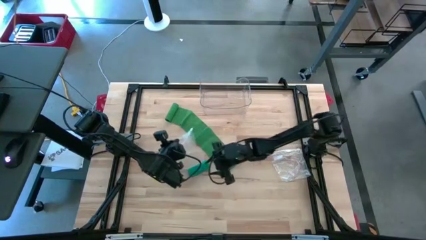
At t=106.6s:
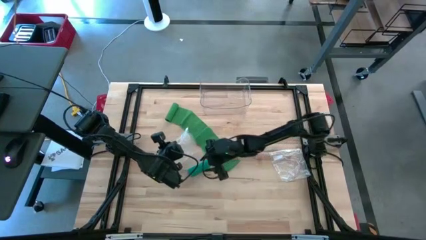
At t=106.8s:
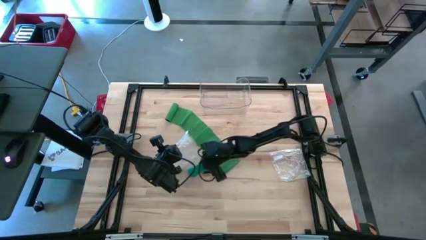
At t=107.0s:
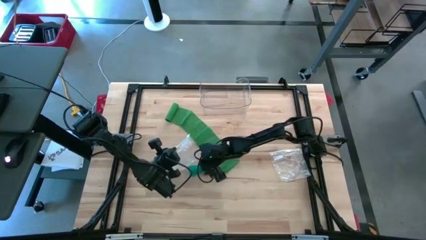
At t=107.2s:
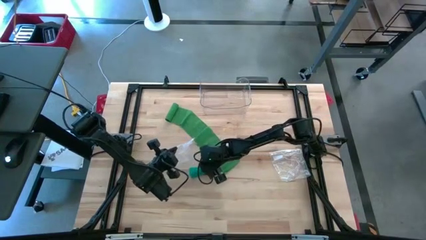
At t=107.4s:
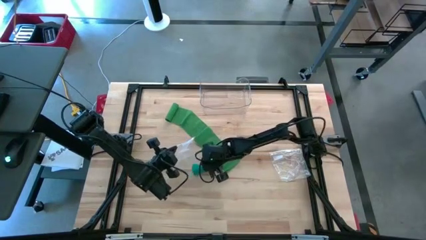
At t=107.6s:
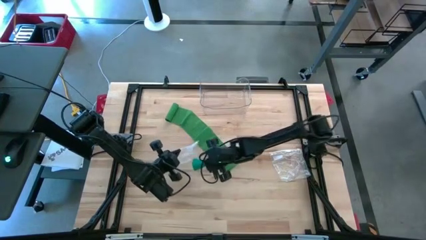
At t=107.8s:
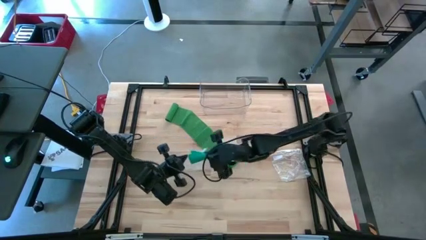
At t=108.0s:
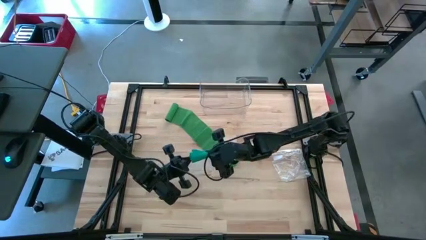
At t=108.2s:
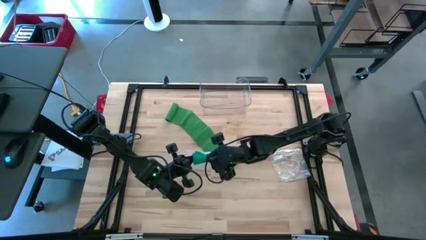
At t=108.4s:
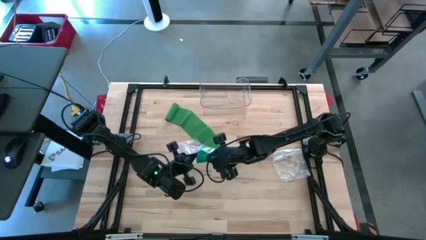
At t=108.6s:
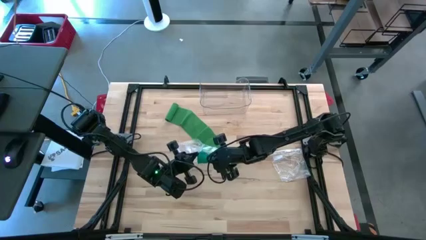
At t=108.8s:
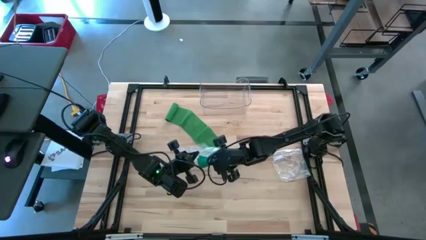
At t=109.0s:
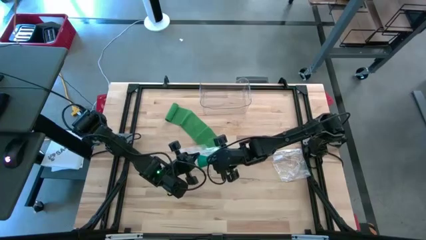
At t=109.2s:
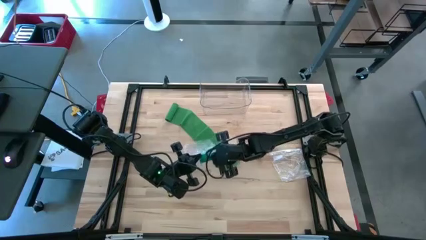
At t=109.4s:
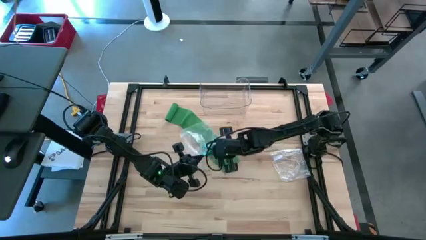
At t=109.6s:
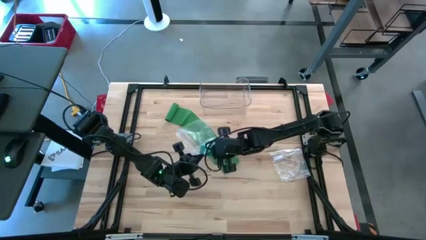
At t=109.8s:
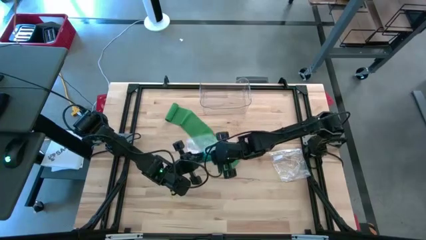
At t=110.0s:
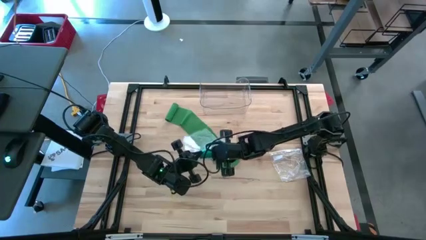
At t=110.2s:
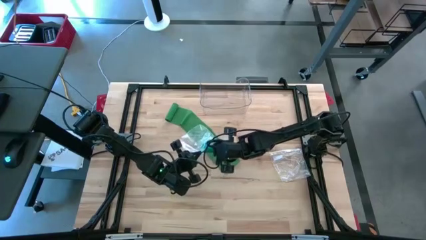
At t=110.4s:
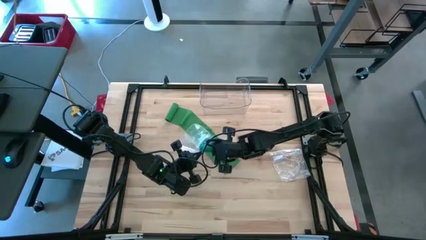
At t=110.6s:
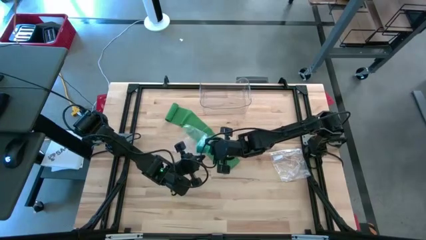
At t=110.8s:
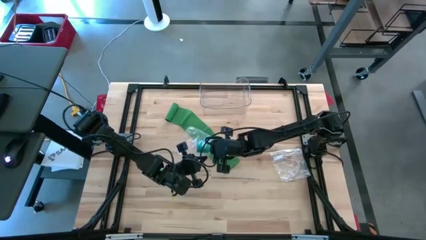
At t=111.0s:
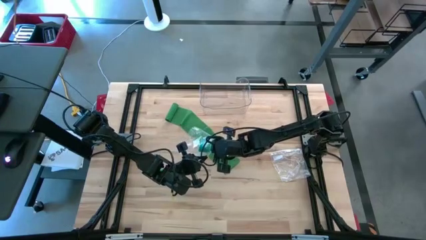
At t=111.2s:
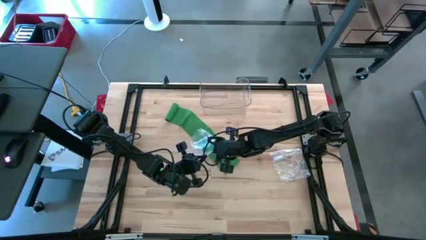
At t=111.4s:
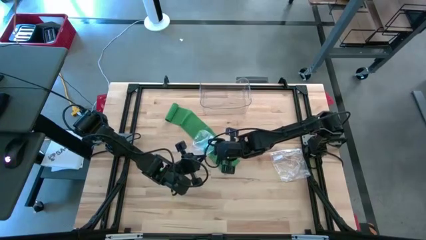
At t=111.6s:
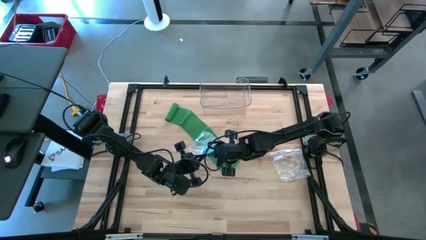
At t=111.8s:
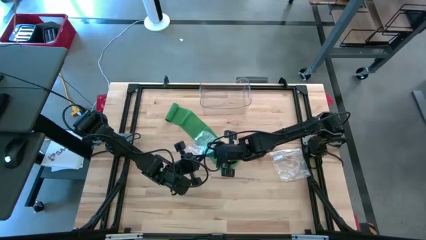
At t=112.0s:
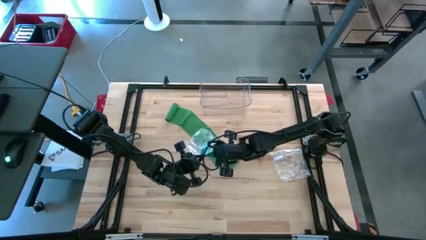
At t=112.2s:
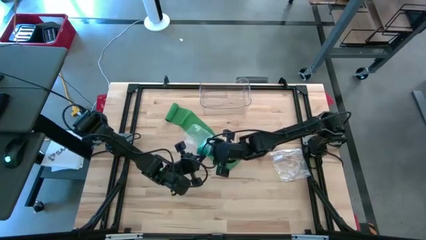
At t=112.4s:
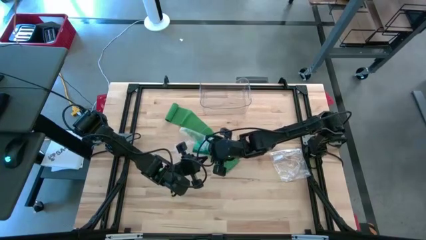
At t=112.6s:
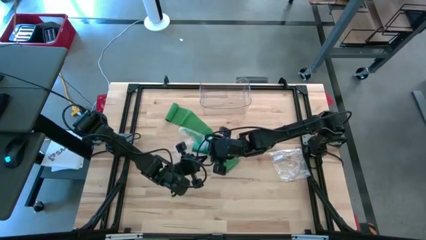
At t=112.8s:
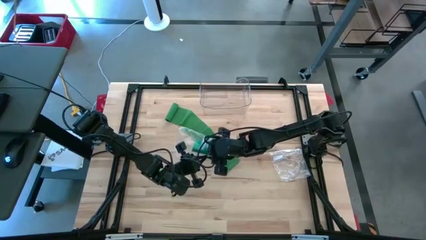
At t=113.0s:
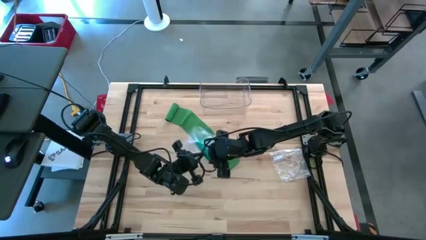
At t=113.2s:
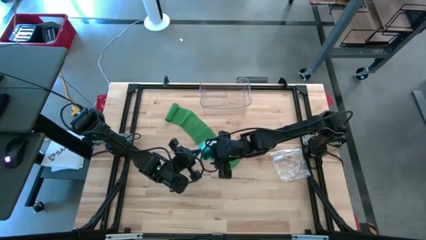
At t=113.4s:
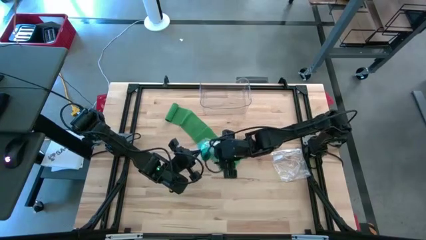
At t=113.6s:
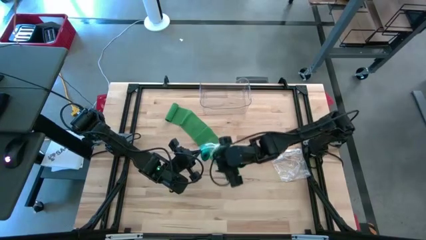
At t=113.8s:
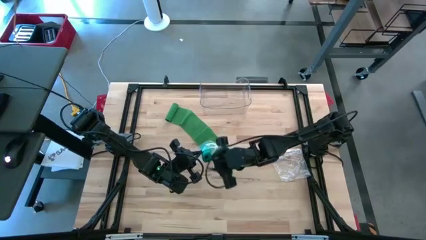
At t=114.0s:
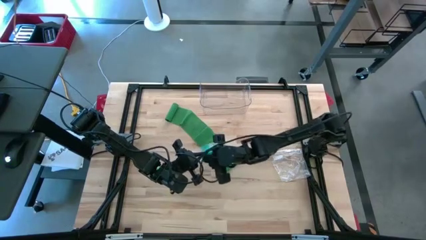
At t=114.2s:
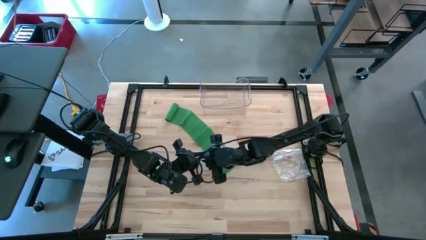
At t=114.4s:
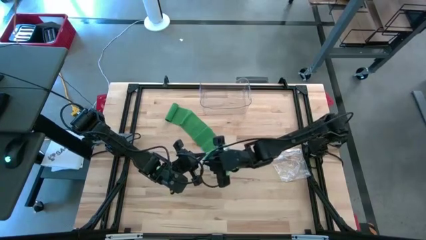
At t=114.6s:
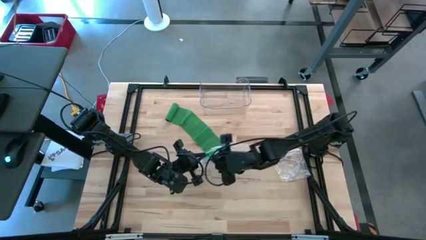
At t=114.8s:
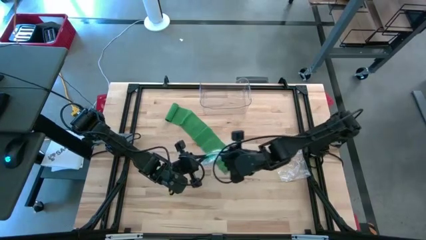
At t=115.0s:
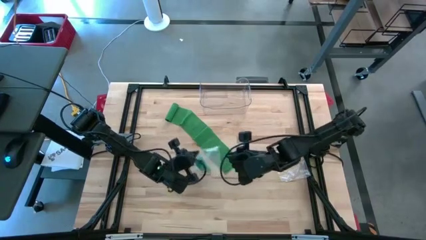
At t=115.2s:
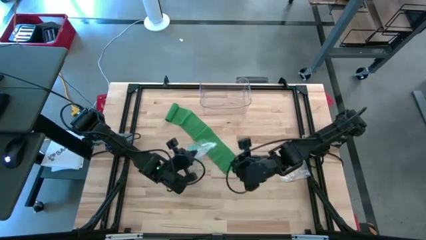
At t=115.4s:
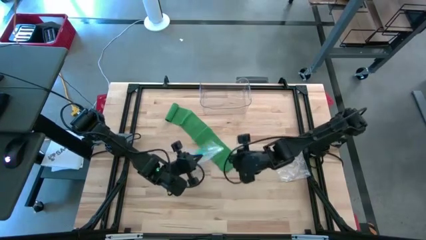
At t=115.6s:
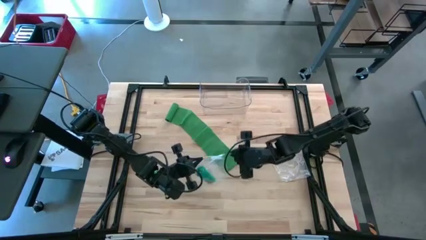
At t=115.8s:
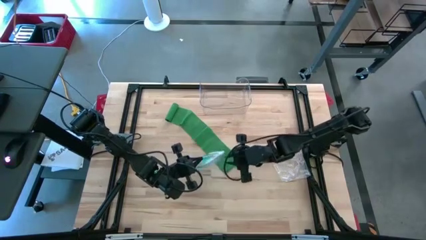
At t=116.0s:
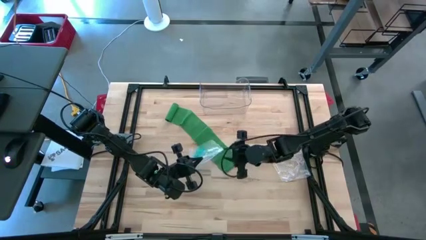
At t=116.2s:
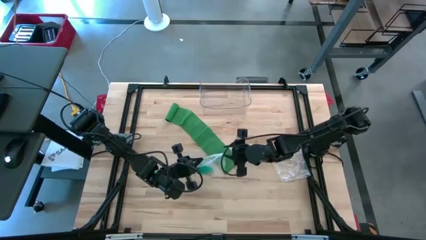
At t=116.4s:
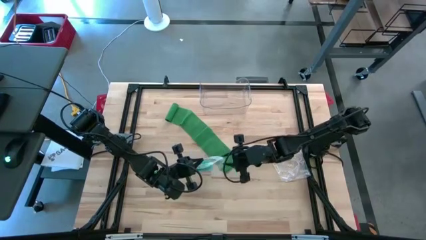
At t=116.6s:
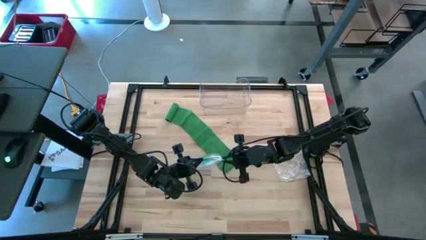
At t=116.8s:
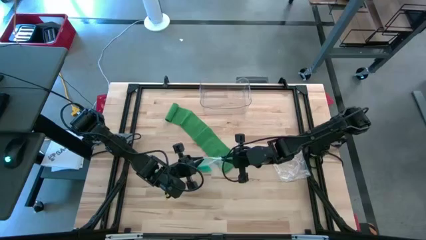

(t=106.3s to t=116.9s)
Task: Roll bandage
Put the rolled blue bandage into the left zip bag
